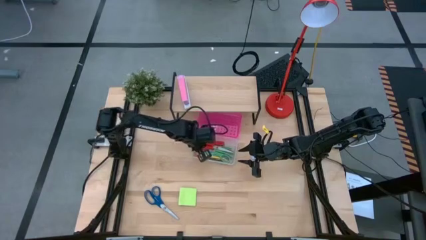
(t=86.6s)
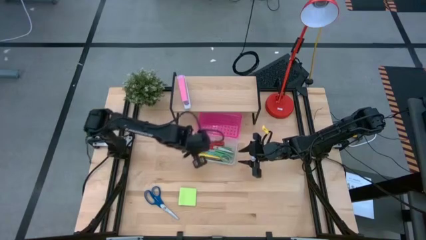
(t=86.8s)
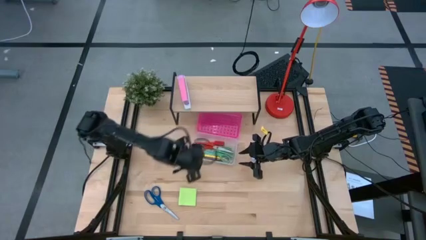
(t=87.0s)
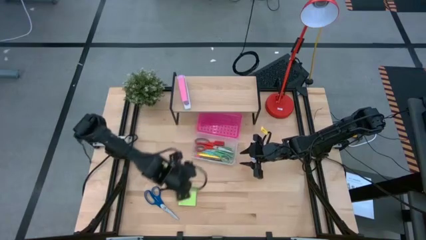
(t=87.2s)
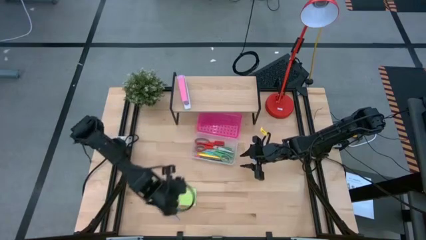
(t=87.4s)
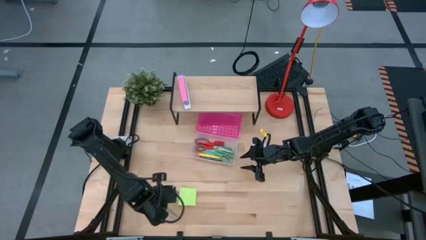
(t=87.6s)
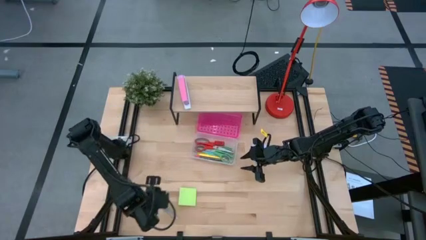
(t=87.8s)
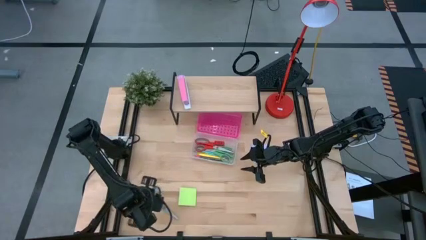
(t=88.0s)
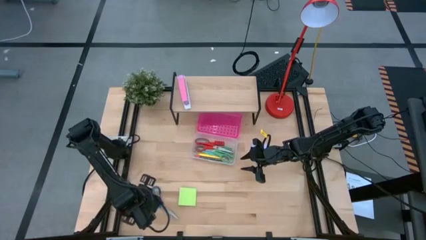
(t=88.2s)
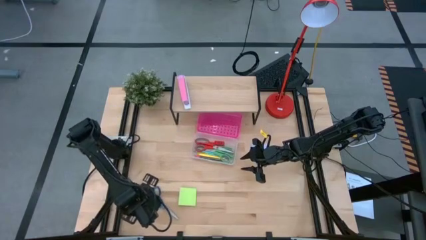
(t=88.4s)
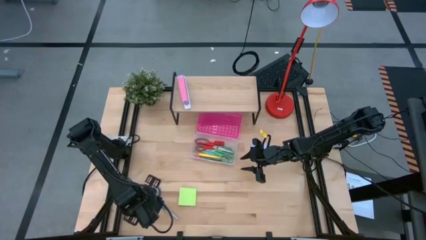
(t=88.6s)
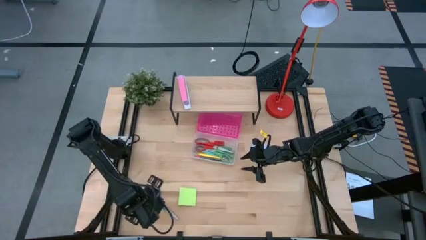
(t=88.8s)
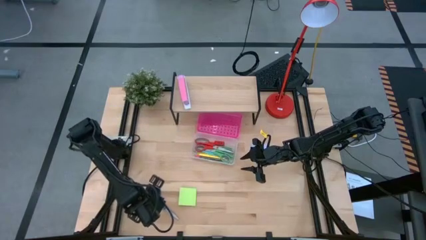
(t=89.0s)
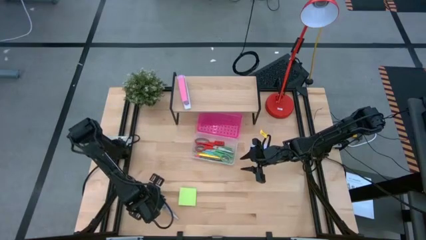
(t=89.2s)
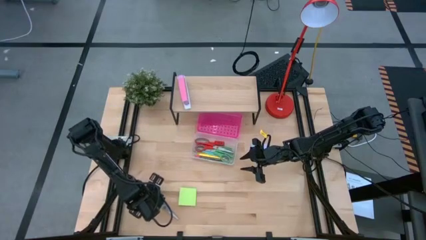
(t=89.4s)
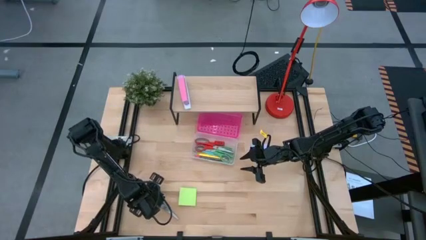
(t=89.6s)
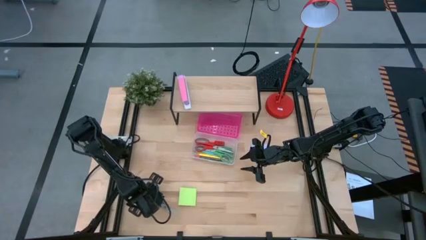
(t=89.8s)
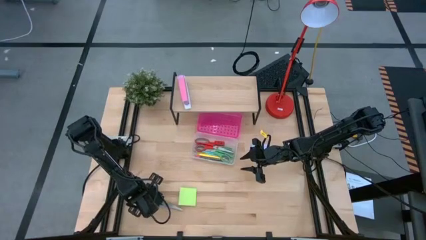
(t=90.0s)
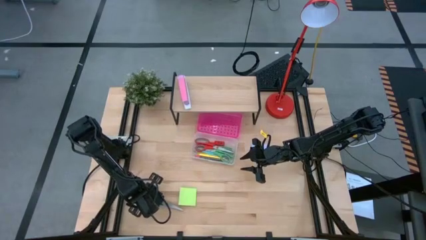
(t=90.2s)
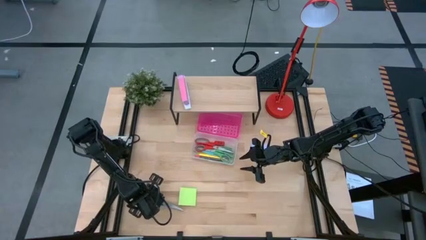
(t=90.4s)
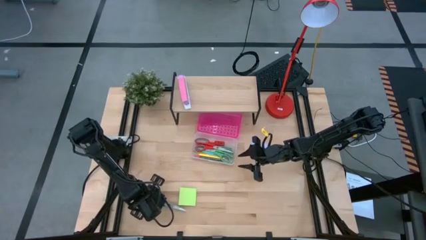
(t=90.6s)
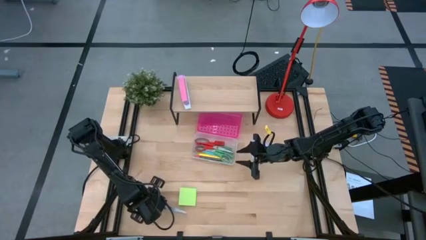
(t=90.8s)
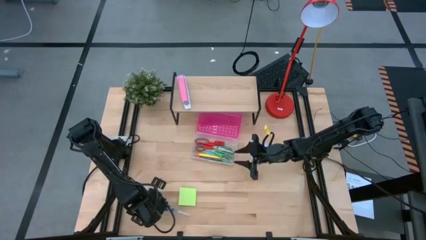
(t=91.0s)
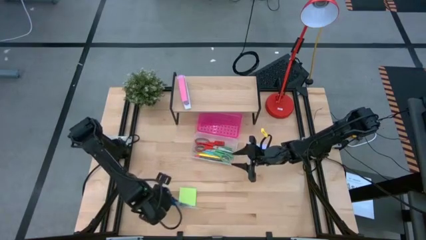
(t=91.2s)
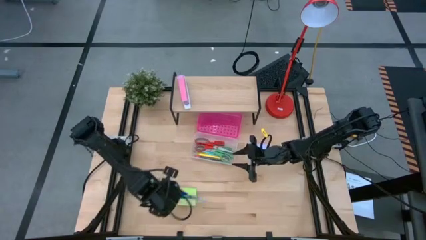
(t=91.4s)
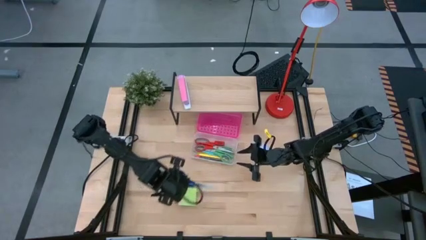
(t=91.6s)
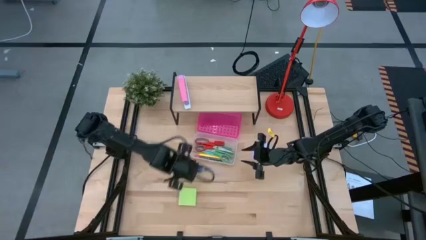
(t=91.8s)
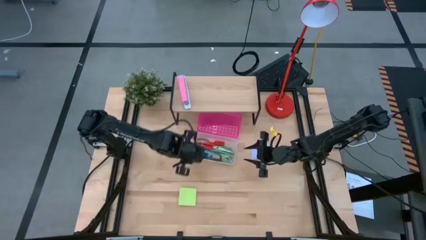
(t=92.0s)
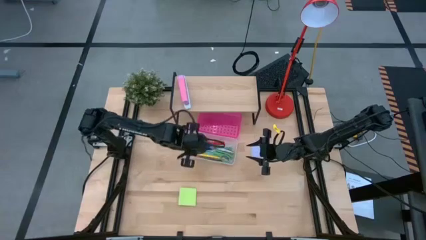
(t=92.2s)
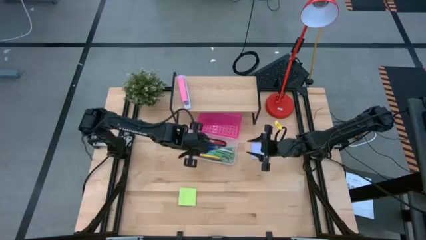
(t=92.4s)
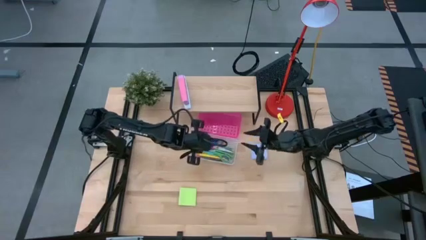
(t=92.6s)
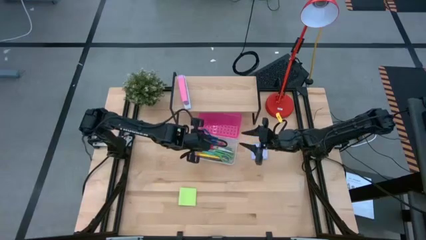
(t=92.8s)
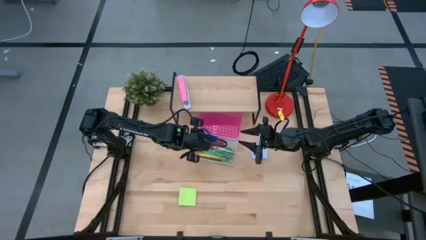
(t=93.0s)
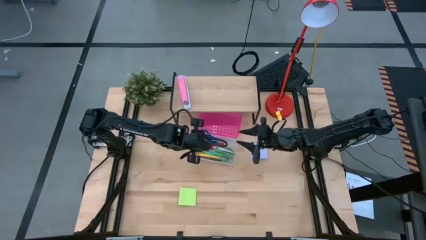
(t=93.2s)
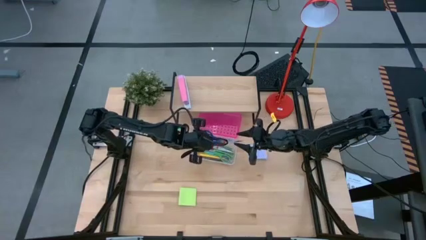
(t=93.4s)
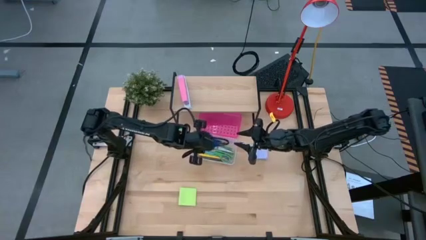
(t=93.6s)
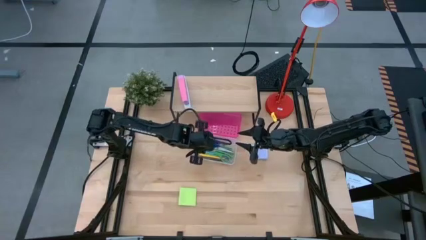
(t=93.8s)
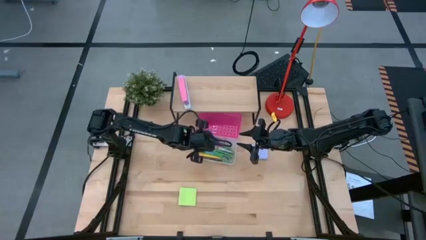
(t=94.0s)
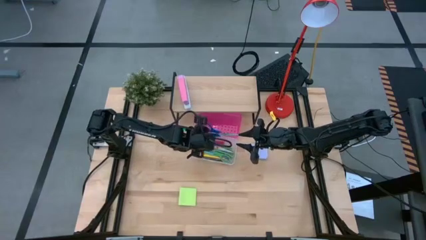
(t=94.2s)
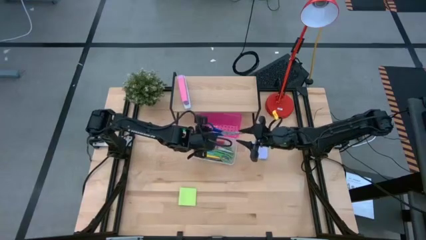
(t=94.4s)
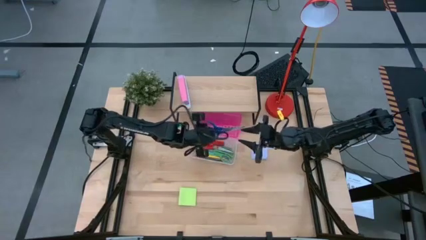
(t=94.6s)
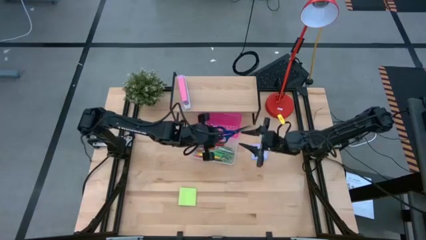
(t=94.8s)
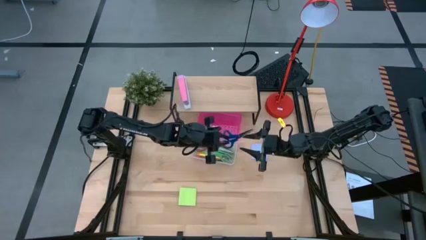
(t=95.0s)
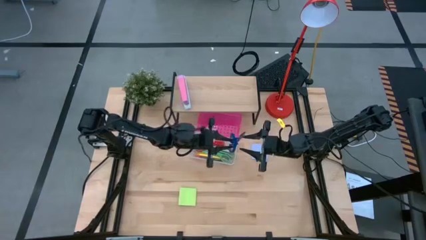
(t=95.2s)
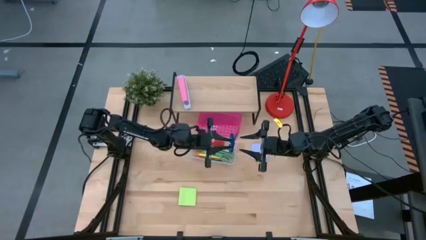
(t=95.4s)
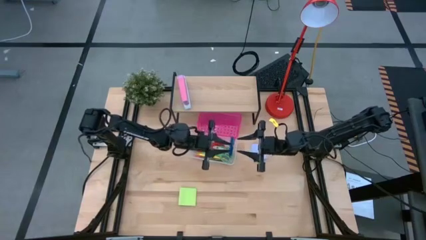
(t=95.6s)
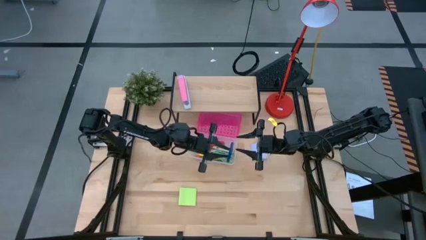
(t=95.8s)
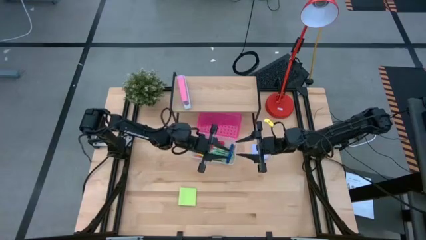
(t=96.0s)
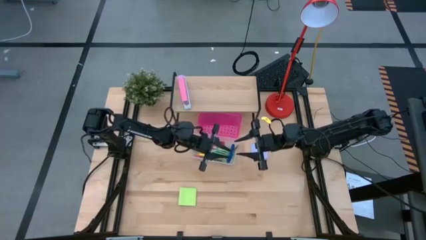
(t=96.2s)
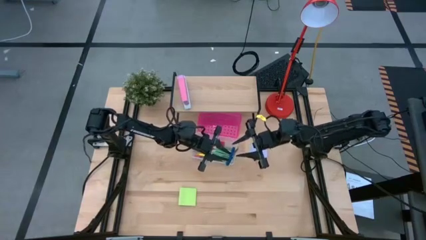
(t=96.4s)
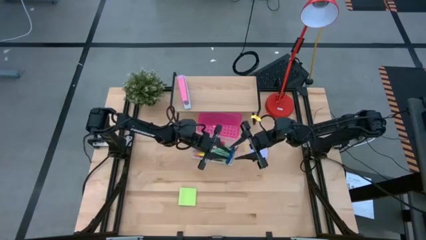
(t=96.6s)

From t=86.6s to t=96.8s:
Task: Pack school essentials
Put the blue scissors into the supply box
